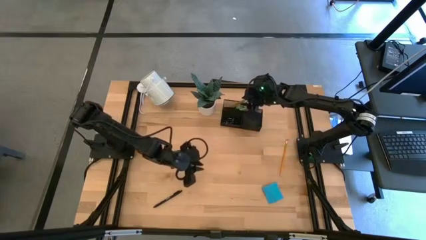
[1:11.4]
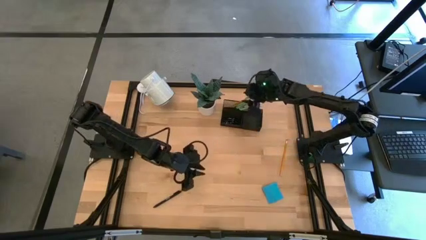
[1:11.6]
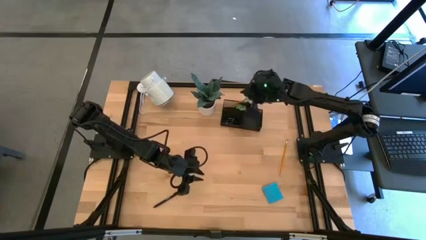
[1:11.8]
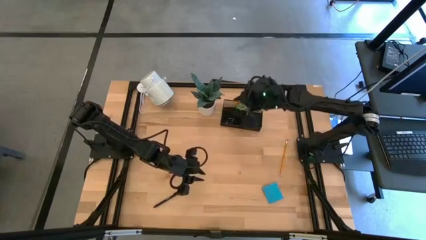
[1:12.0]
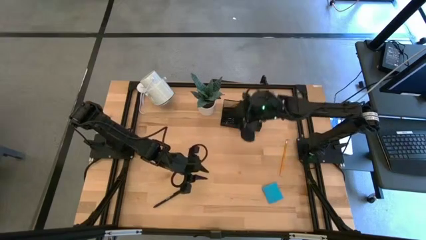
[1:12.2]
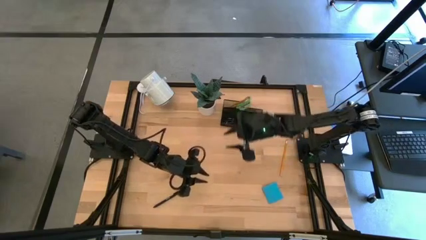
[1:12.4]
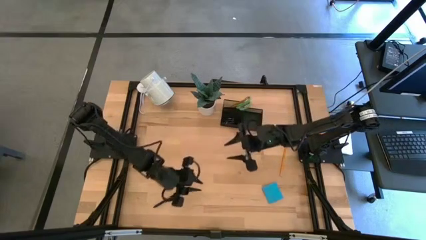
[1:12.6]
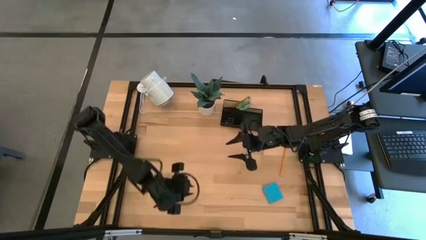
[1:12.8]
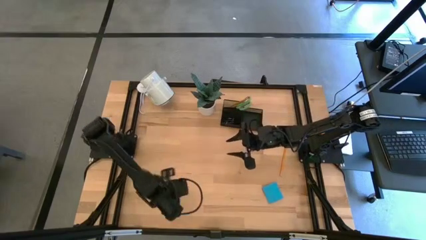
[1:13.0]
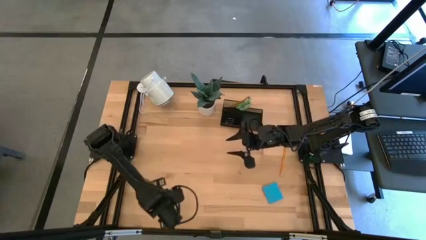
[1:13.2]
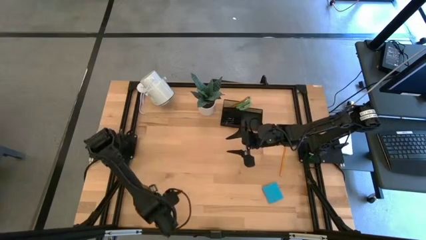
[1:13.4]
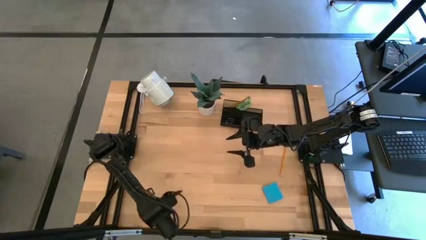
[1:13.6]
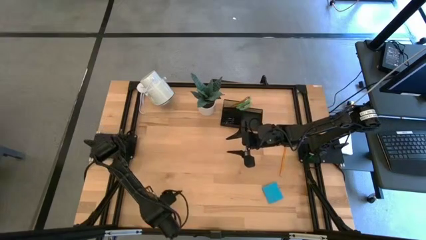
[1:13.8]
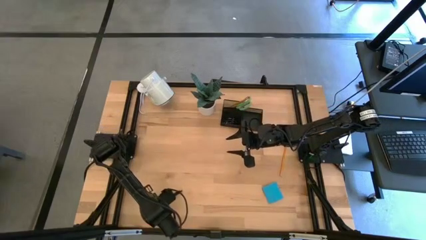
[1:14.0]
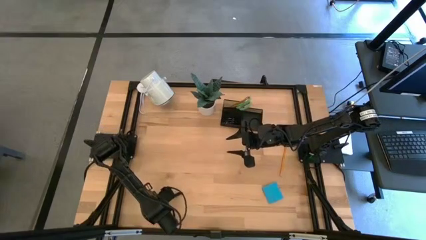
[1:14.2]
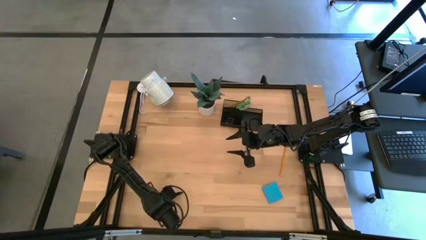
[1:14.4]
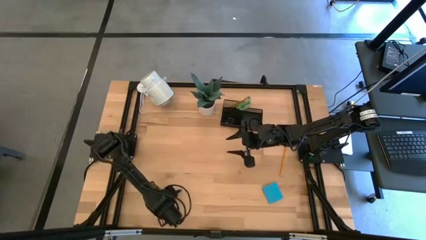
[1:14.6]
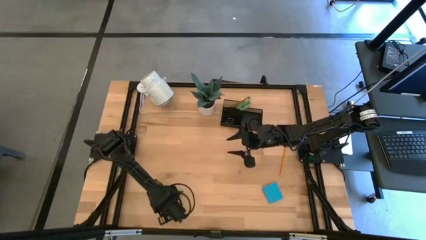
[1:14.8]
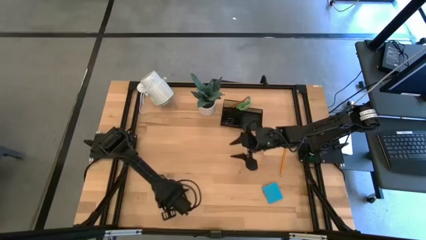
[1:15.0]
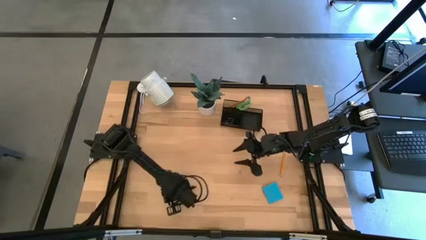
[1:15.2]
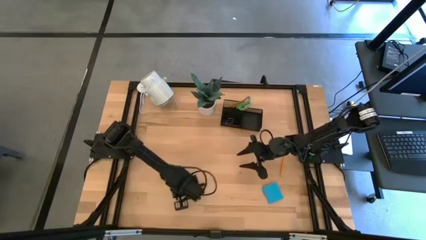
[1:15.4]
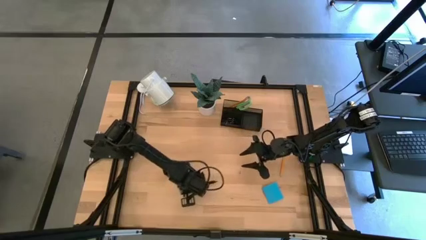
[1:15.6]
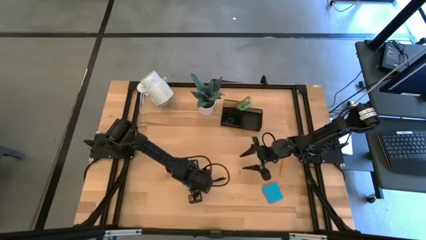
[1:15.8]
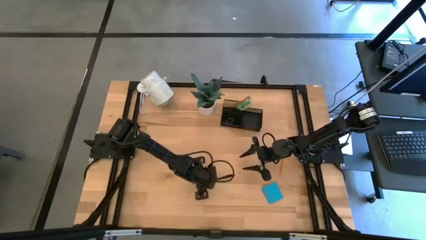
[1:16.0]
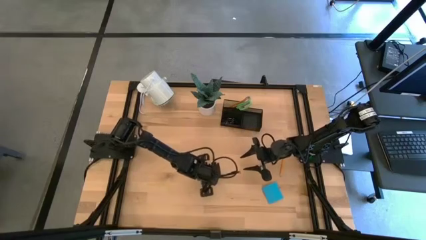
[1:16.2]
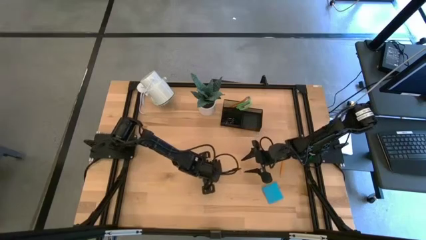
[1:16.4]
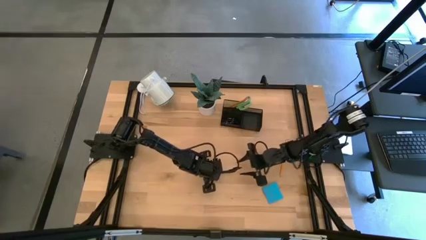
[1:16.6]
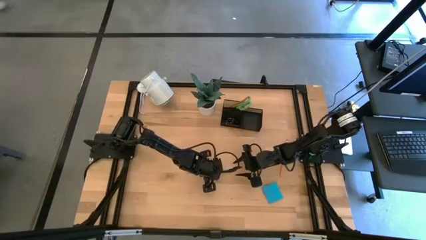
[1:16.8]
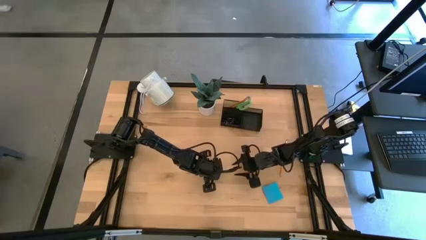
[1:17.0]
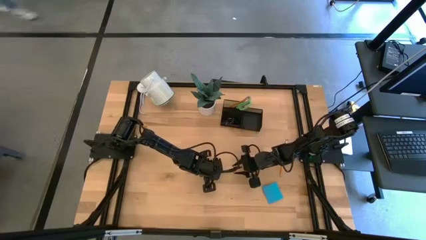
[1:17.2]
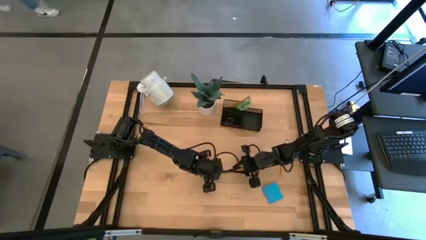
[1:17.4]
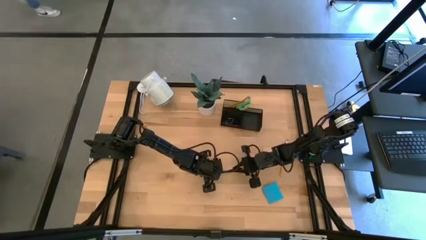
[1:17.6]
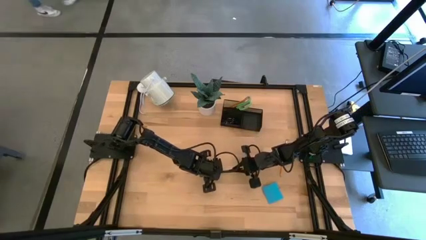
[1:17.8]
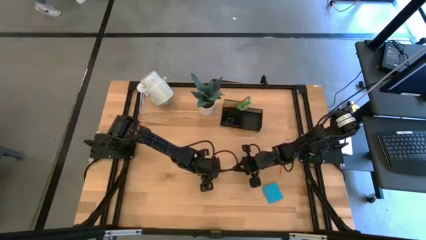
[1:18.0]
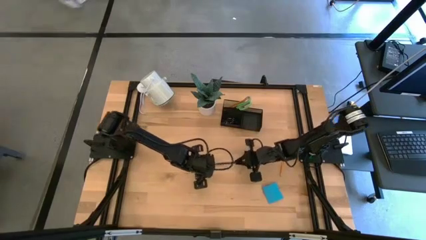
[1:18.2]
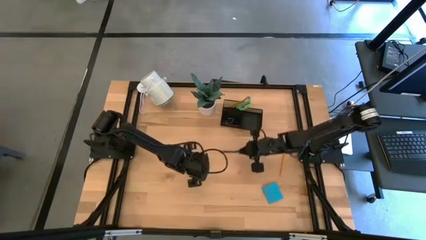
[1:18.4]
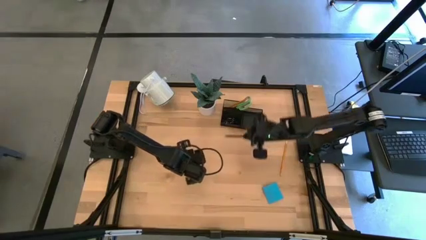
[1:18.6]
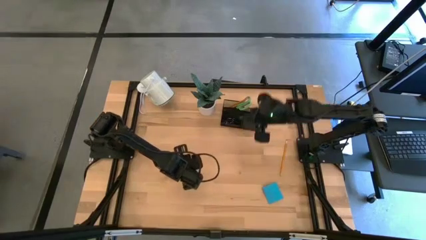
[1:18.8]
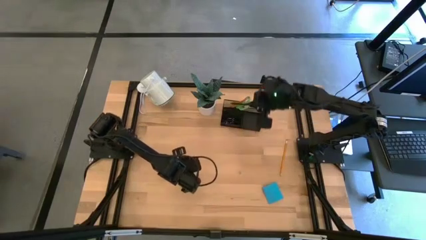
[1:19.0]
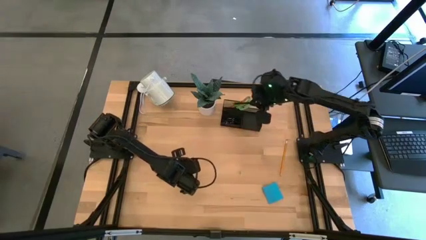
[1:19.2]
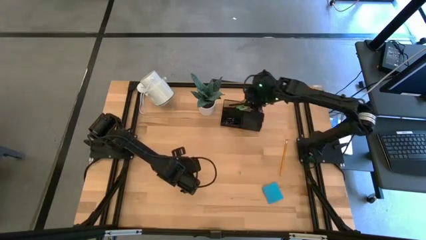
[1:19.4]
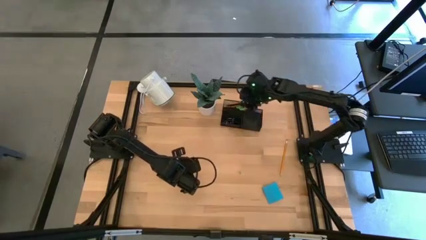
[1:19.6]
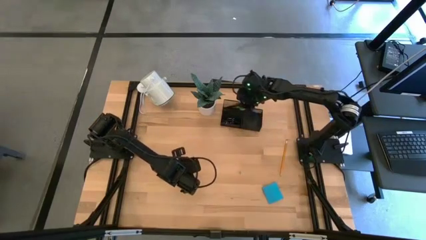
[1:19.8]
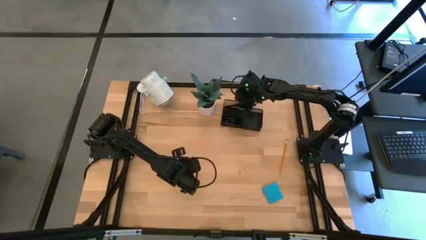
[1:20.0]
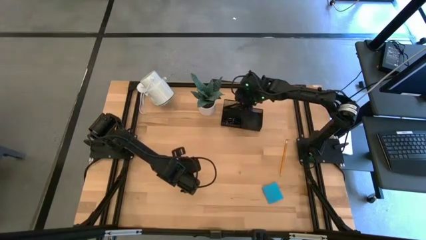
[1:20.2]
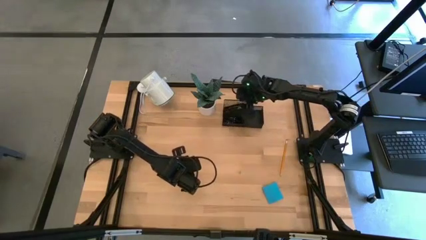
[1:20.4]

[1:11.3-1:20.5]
Task: Pick and place office supplies into organizer
Put the black pen into the desk organizer
